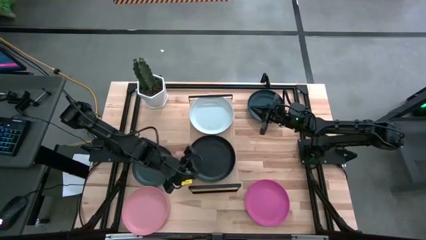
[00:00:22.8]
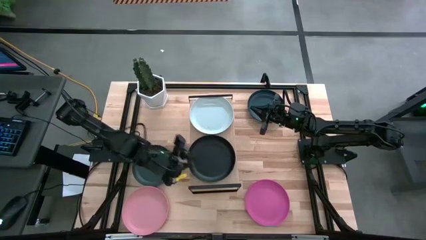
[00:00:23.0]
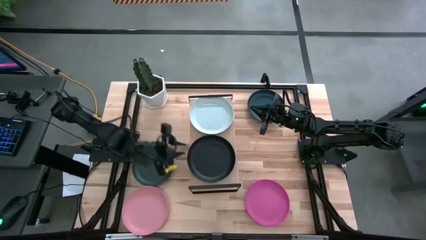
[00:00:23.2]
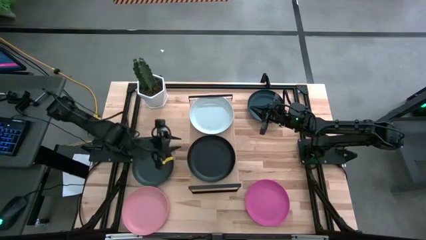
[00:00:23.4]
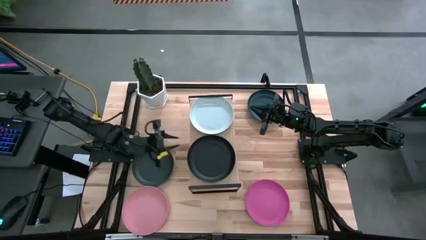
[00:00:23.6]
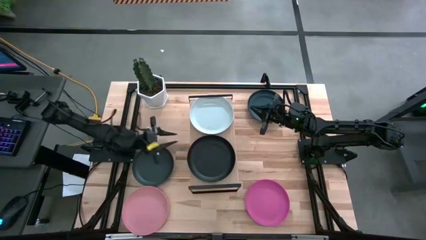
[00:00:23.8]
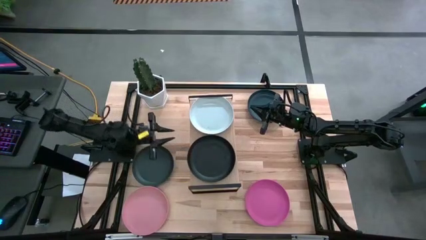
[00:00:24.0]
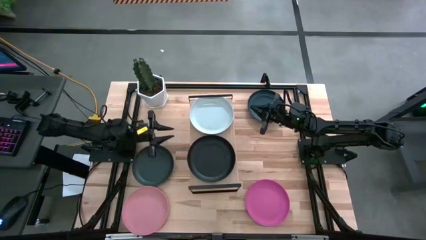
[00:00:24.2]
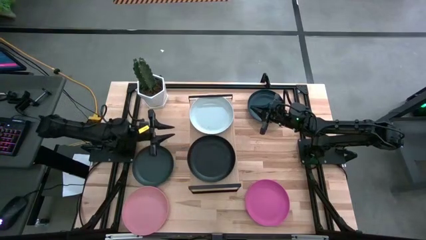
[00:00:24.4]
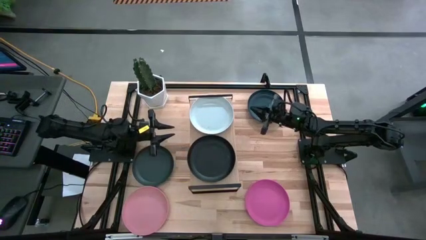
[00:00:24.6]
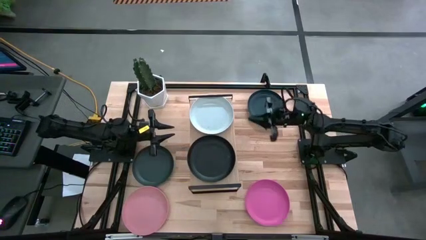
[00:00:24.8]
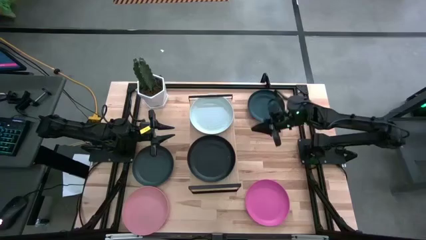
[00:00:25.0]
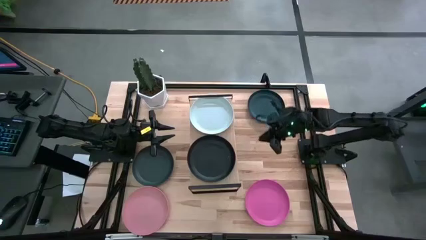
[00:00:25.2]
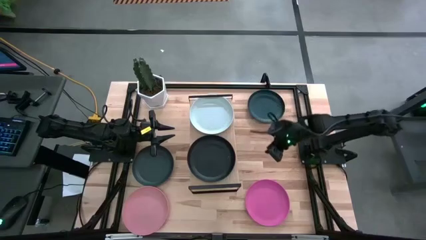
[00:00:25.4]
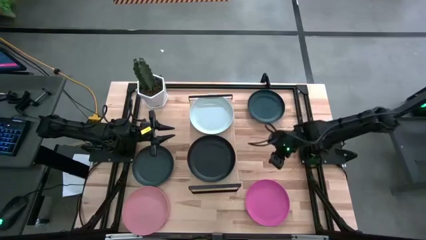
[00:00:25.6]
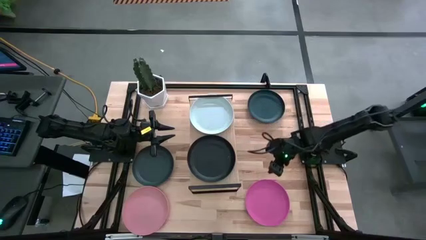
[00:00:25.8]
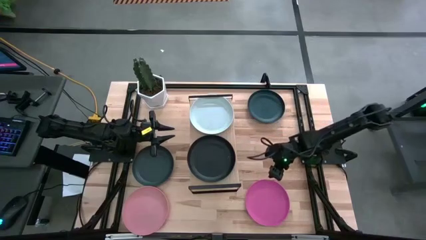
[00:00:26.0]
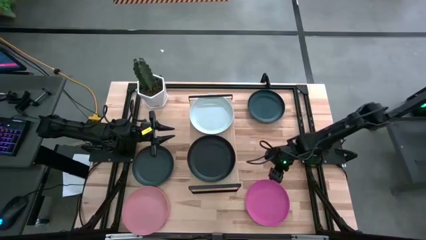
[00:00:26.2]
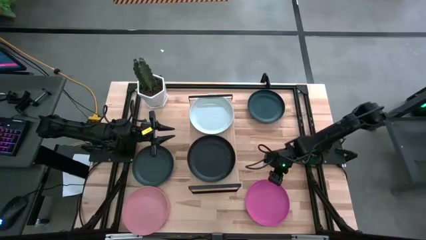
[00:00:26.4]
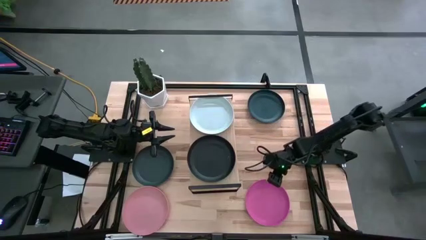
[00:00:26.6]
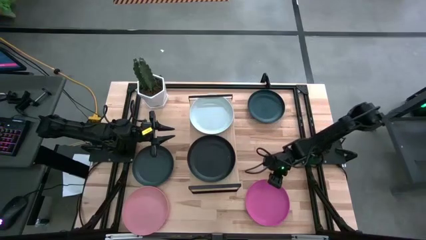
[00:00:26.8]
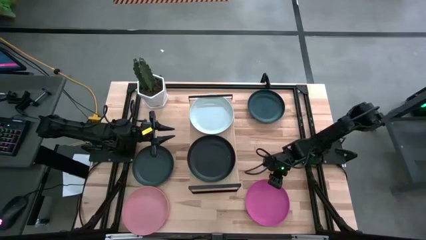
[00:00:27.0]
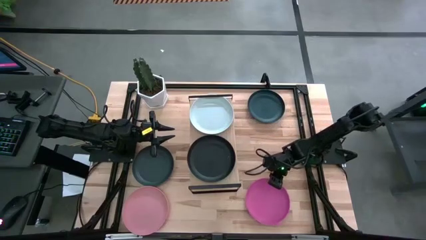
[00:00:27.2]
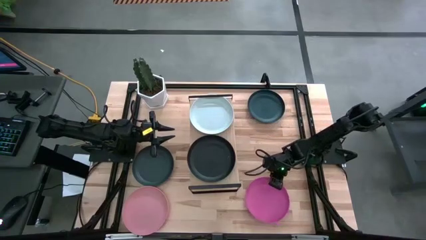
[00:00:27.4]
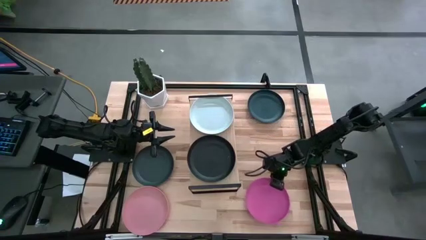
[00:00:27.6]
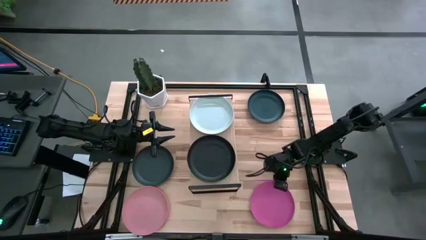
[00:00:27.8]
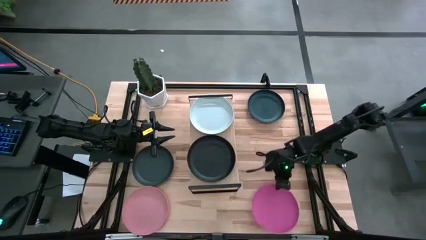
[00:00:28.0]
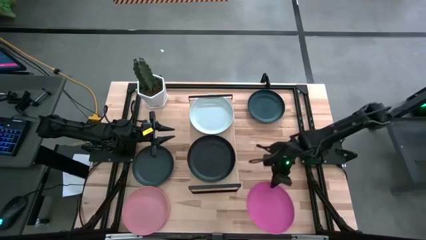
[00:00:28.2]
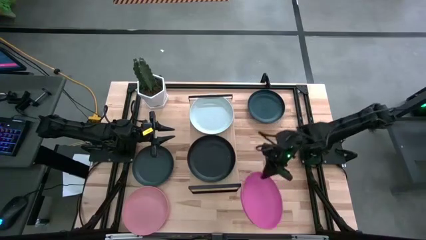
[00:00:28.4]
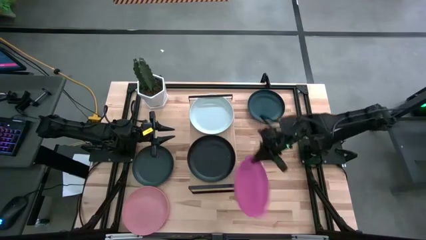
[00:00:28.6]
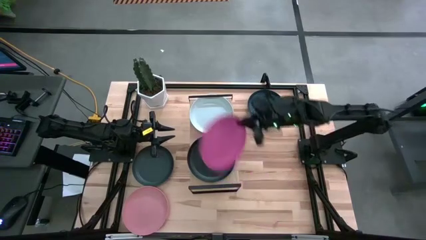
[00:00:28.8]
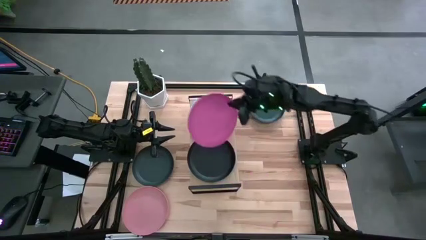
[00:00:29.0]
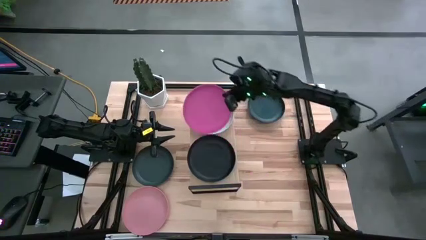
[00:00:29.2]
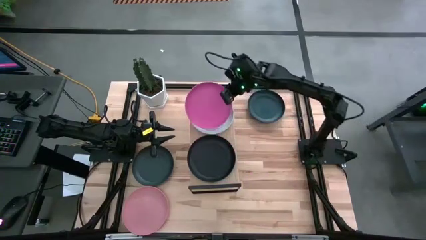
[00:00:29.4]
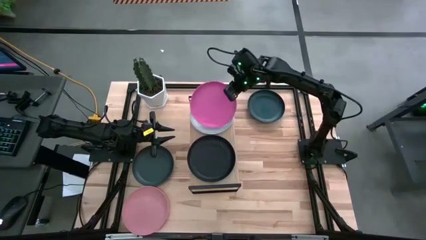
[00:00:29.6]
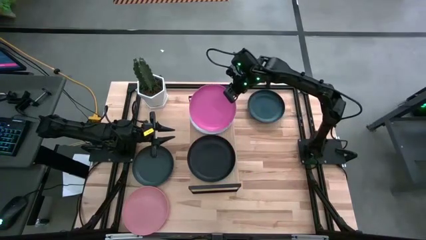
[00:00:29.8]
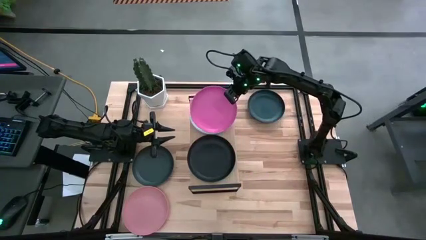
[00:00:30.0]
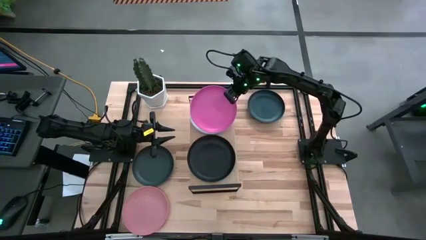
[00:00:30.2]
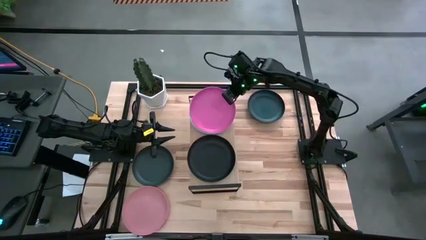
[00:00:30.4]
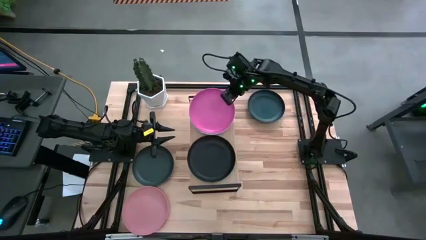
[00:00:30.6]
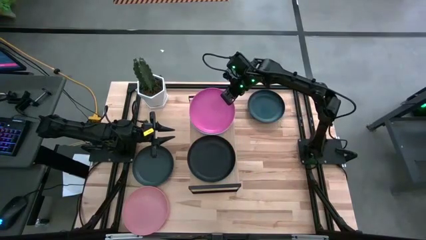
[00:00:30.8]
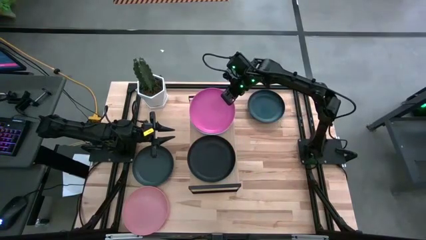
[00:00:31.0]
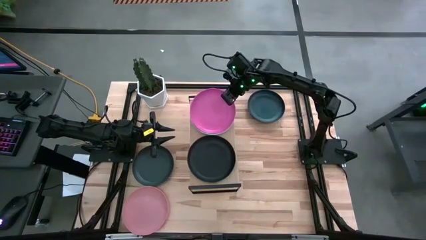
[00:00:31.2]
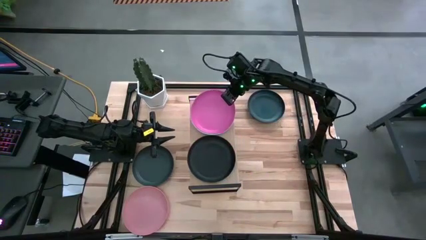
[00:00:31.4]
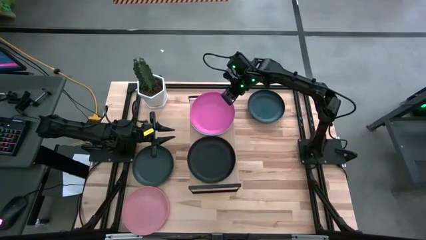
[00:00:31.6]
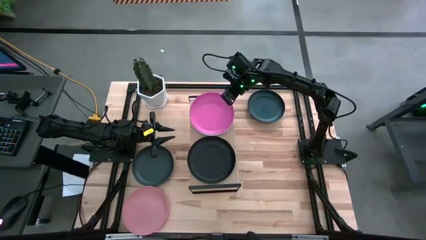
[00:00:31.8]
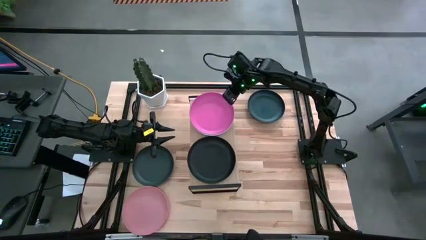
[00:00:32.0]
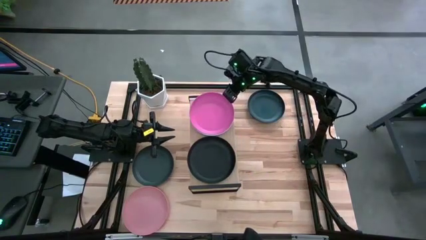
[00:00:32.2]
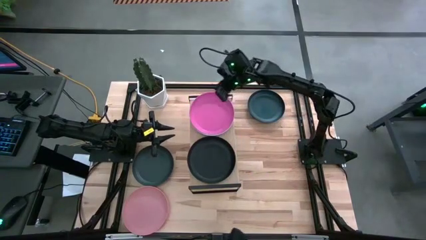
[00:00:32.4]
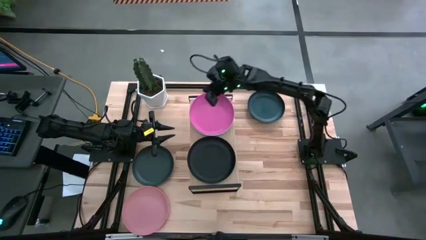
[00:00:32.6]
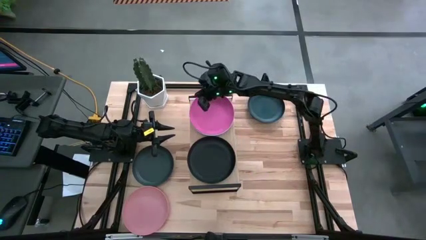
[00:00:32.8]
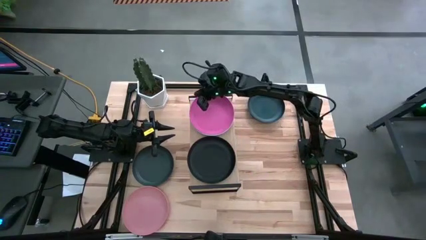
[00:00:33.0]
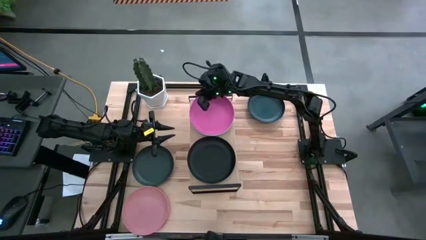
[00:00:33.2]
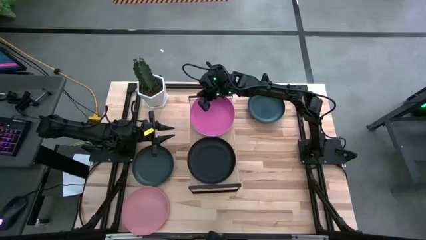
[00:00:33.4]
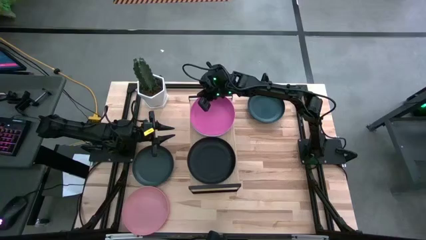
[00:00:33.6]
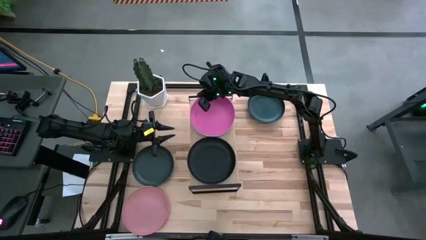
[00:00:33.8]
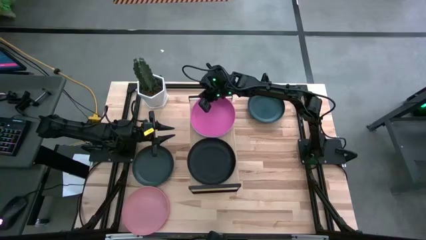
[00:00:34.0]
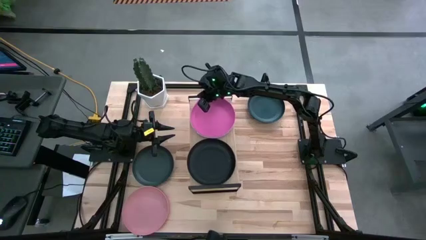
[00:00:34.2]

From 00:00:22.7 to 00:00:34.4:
Task: Place and stack plates onto a shelf
Stack the pink plate on top of the white plate on the shelf
